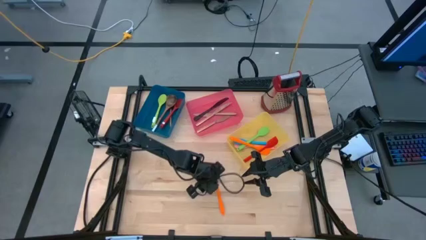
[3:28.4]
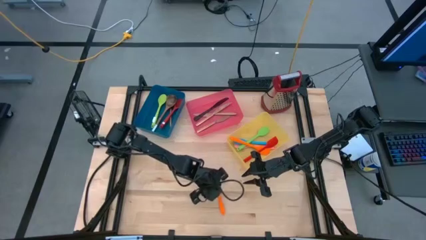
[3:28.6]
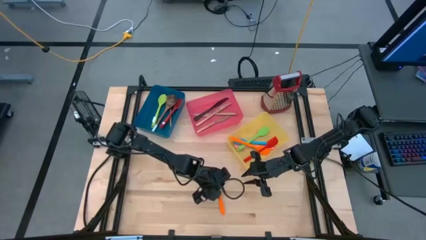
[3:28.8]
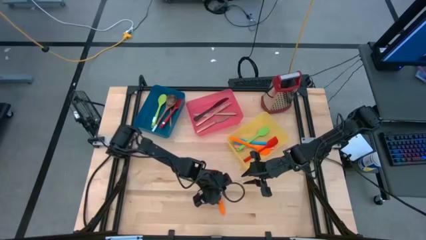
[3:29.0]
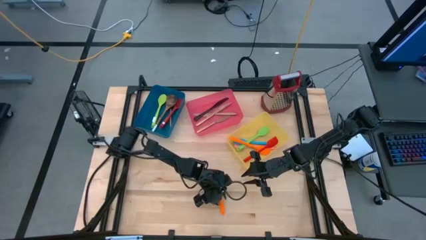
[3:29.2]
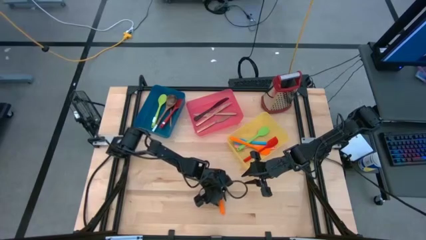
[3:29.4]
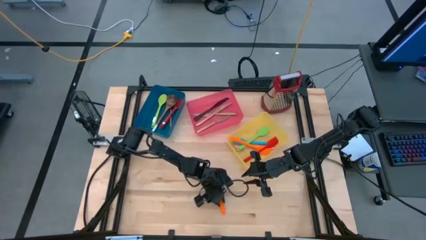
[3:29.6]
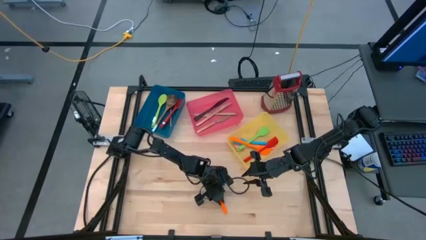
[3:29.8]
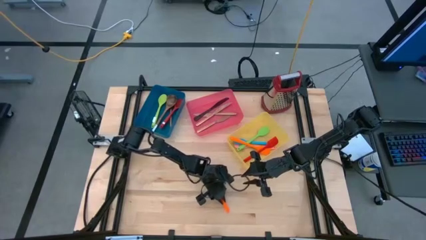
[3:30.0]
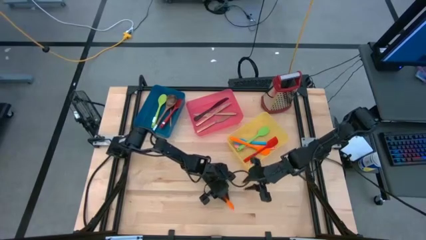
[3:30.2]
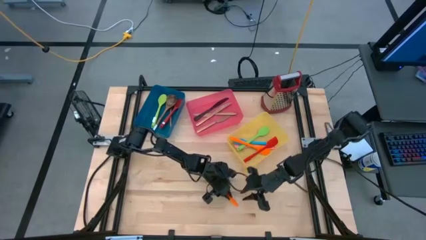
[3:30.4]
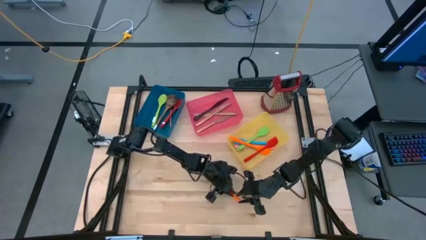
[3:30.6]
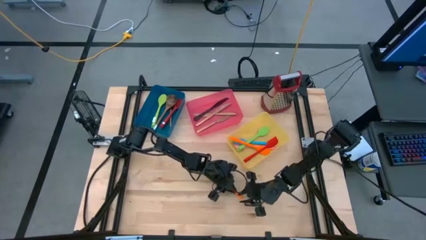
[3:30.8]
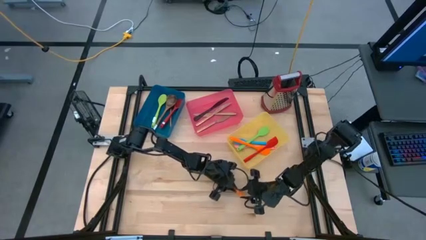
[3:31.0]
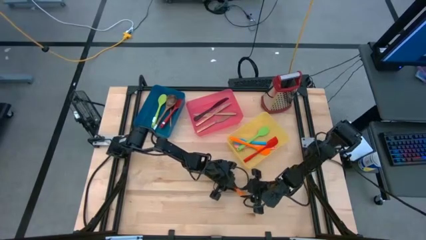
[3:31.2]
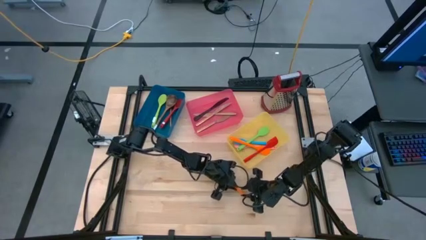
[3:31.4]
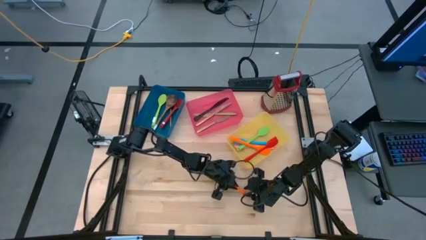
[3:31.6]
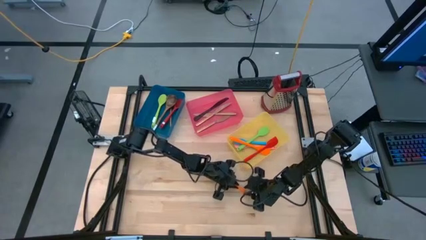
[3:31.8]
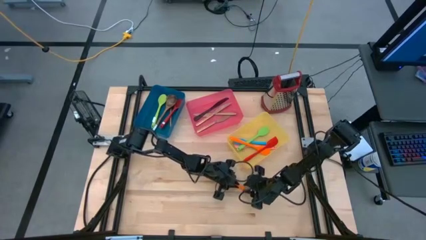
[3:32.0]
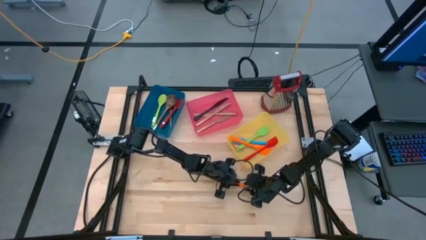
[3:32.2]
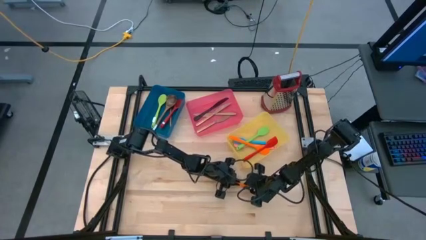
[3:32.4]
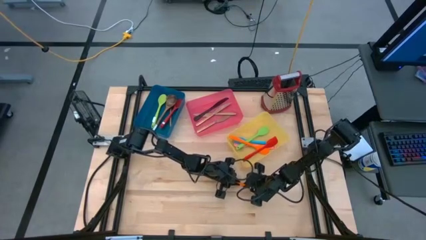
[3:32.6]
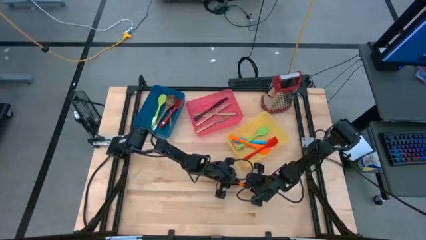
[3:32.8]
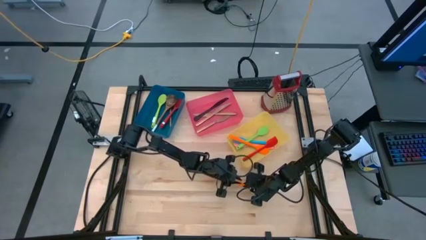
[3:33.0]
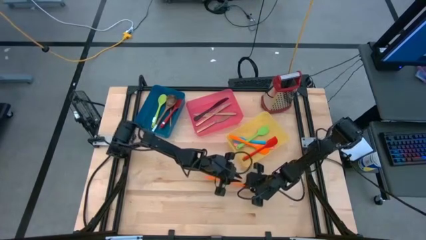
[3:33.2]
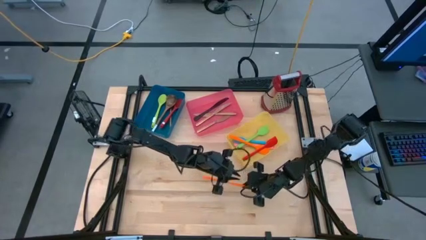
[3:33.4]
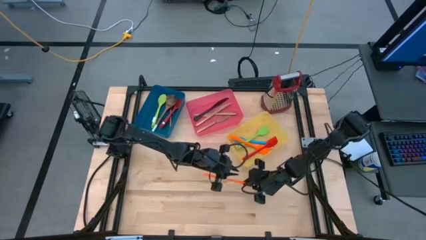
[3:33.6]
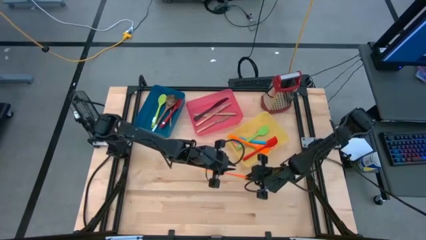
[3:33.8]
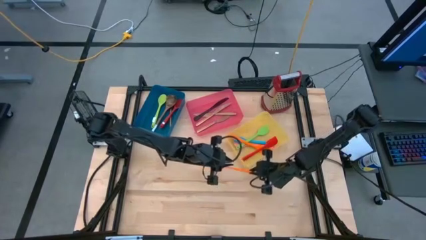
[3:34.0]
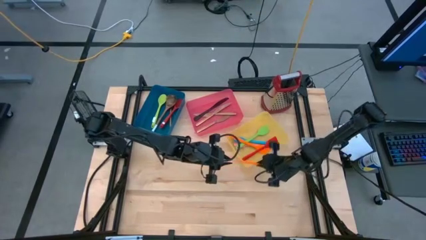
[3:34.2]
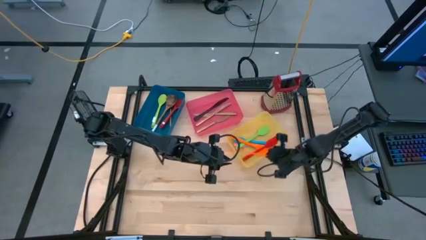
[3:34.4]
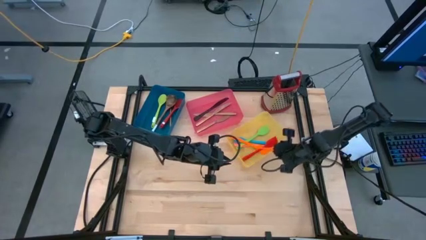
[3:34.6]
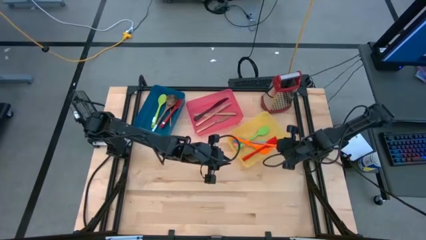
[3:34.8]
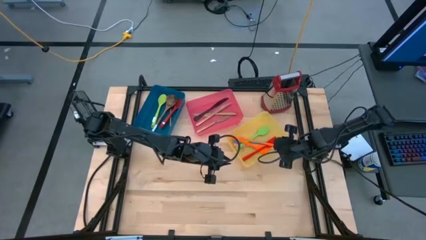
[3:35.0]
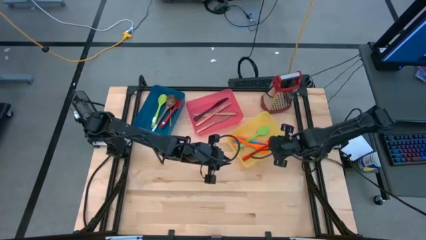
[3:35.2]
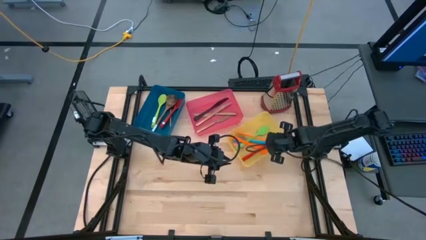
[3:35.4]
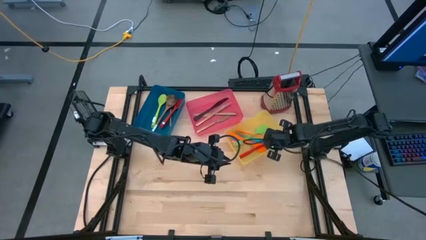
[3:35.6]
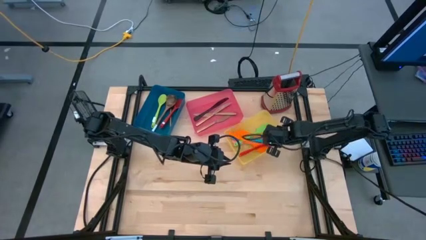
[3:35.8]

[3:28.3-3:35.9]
Task: Pick & Place Kitchen Items
Put the orange spatula into the yellow bin

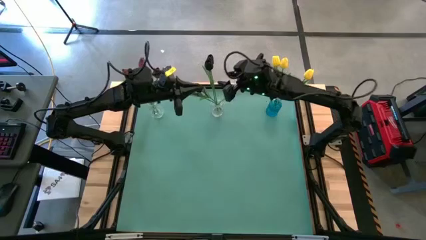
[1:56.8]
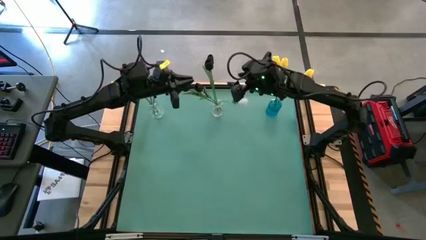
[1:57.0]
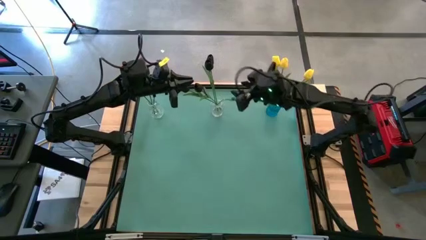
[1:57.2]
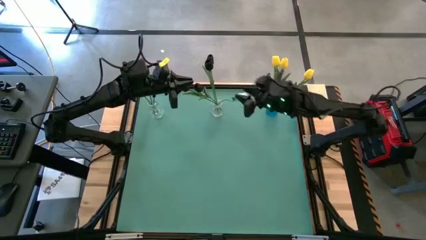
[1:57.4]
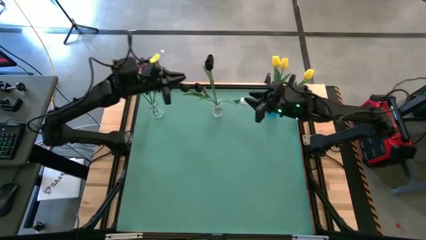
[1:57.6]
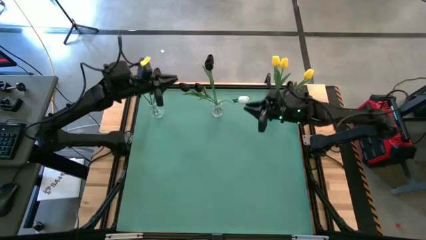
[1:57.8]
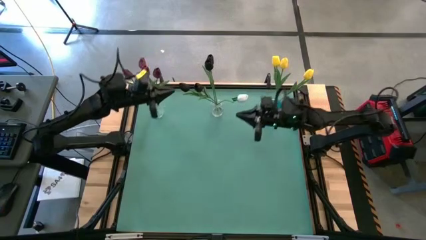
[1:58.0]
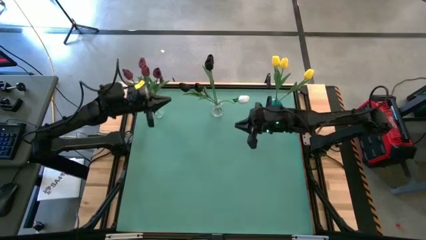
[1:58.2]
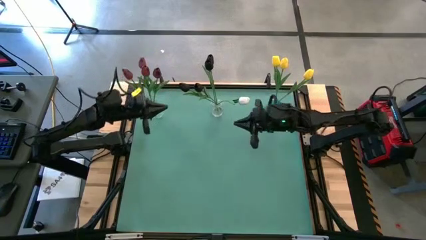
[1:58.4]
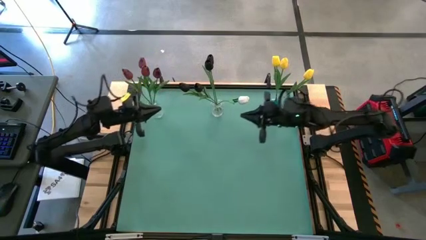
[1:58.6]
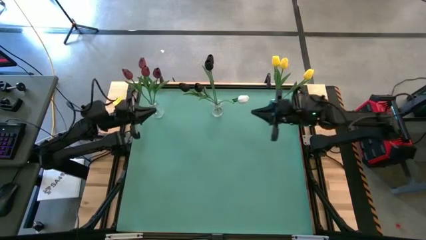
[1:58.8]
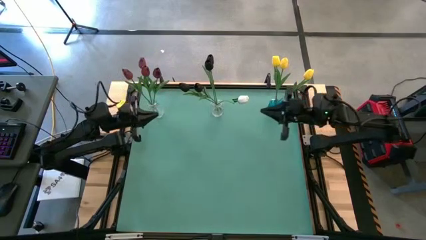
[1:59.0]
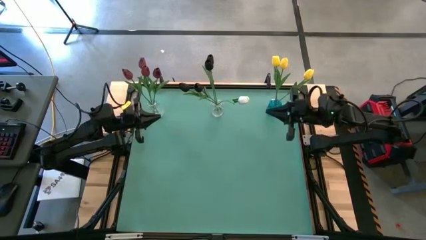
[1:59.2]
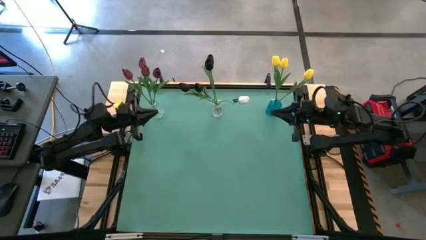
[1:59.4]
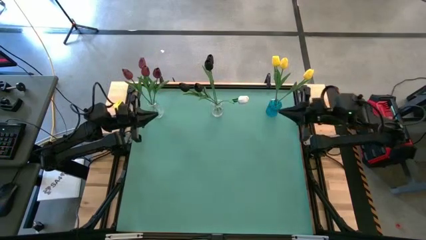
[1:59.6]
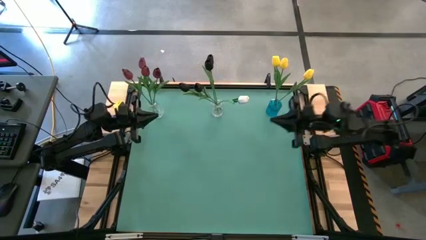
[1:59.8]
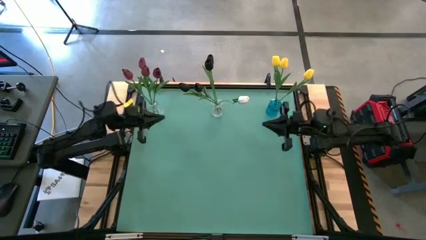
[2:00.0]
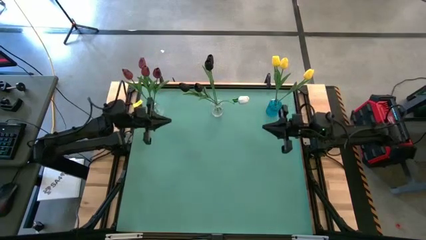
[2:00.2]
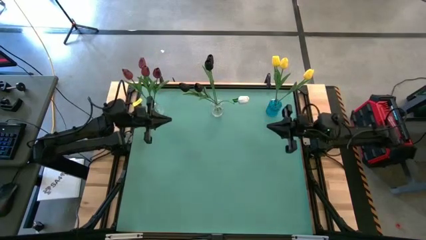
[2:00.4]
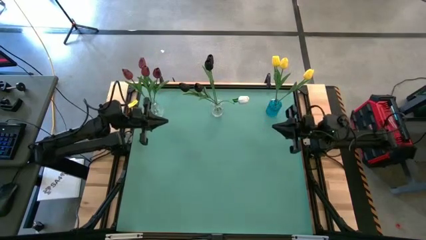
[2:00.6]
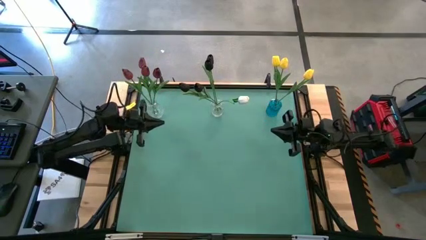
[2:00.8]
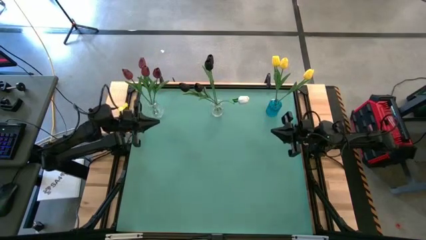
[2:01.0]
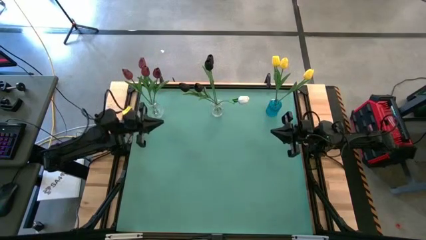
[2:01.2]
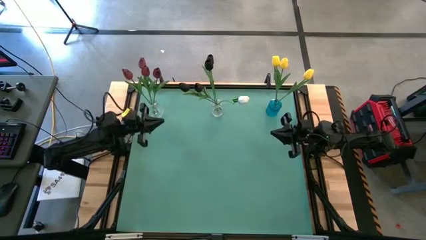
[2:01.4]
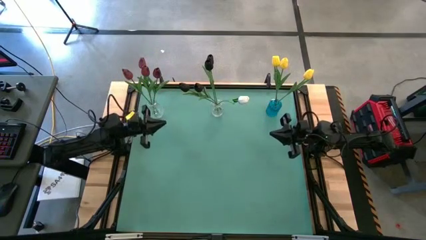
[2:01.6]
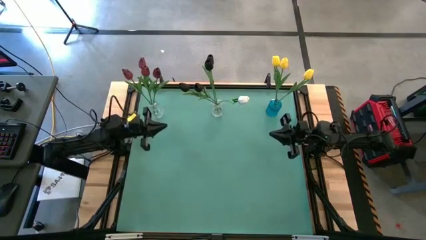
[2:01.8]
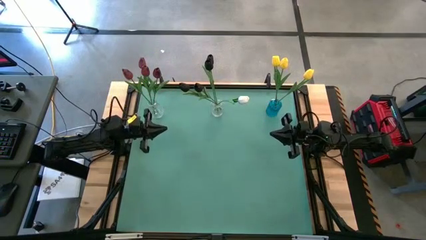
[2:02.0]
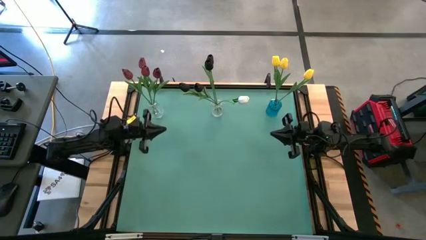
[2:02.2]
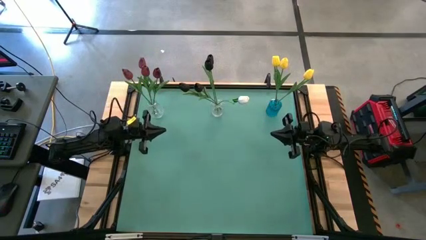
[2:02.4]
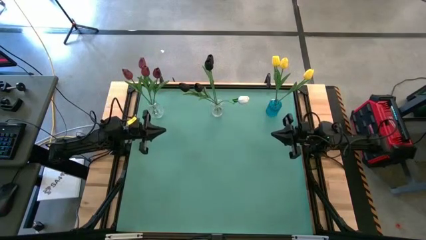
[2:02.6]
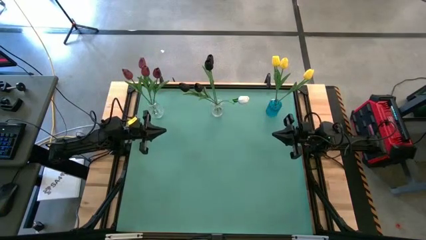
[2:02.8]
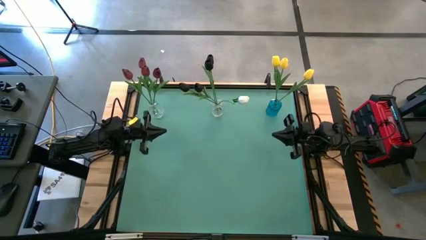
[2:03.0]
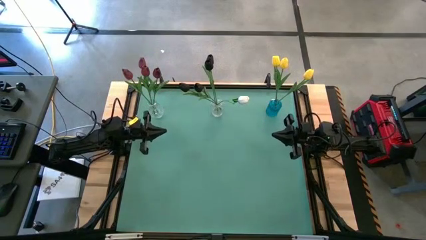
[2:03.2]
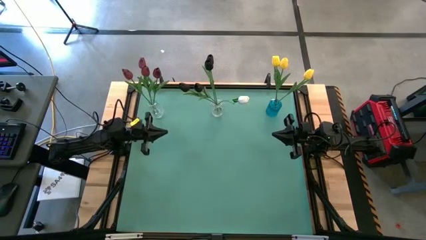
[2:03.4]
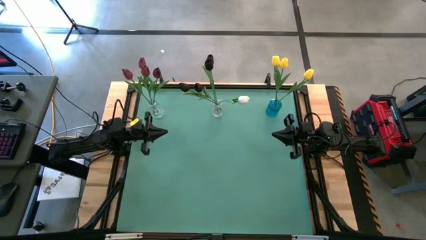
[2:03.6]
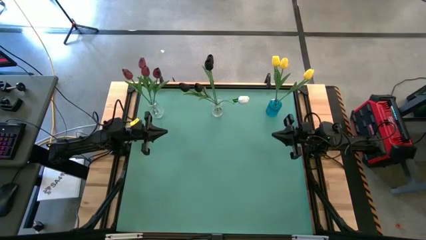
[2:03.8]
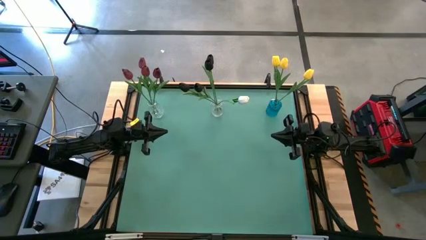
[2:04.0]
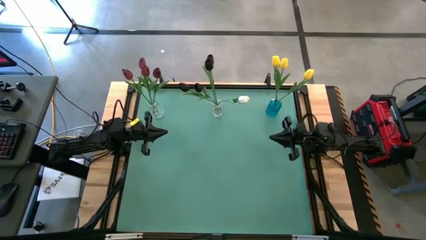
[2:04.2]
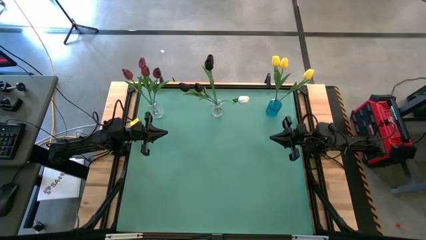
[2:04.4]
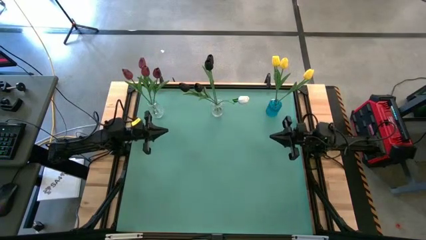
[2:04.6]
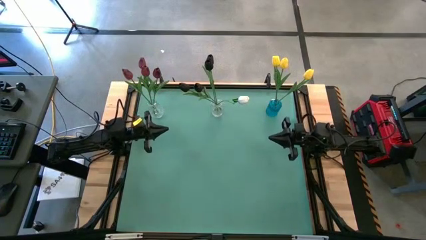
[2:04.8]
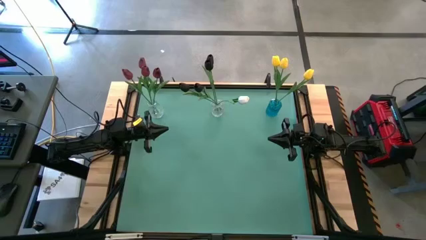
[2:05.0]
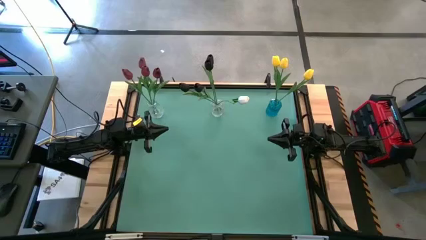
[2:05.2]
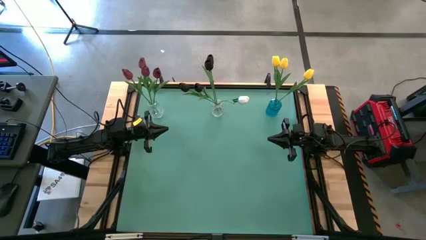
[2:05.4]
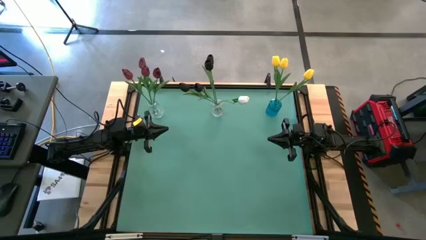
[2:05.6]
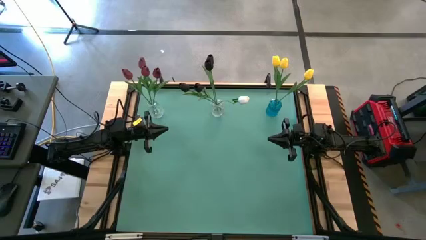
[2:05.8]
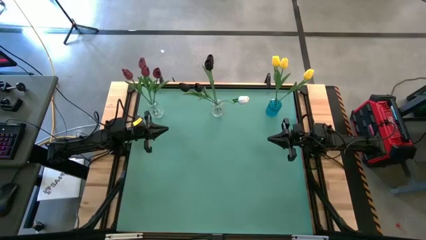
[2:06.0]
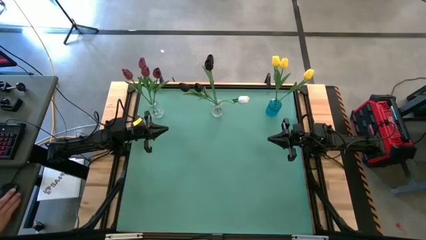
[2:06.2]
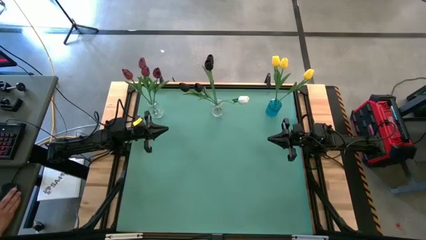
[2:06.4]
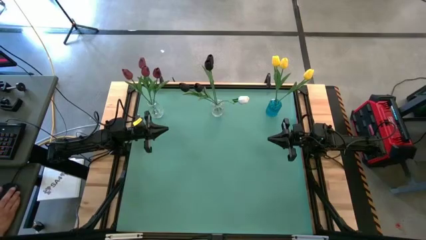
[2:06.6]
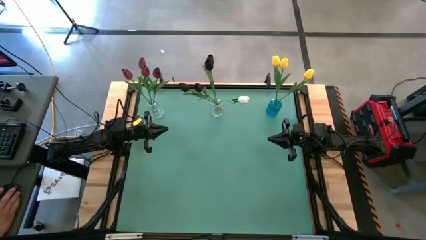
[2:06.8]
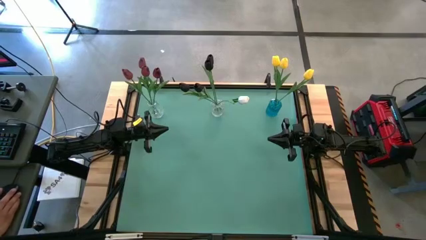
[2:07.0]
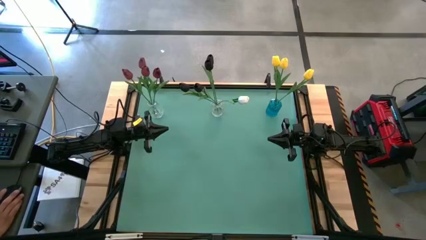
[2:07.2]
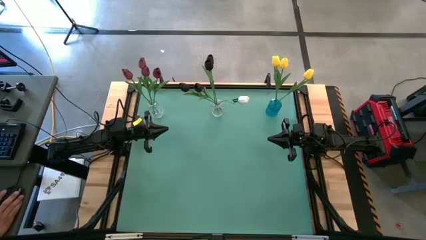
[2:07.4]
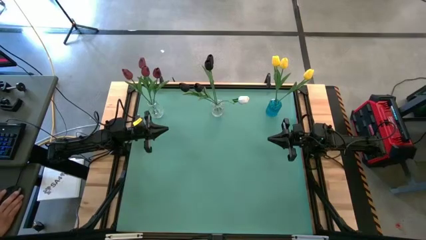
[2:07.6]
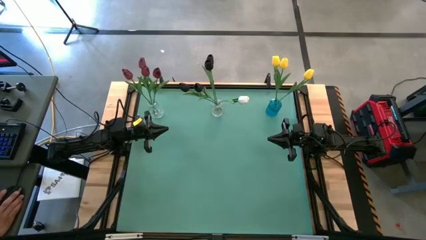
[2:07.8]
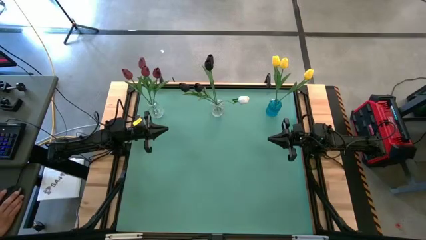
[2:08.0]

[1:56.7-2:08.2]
Task: Sort flowers into vase by color
Return to Home Position
